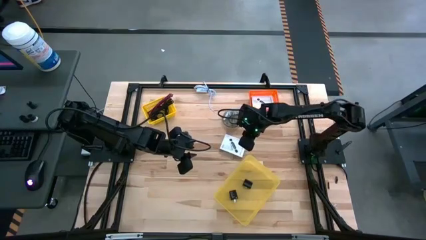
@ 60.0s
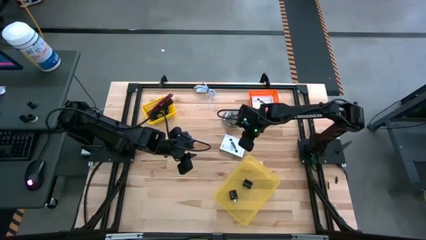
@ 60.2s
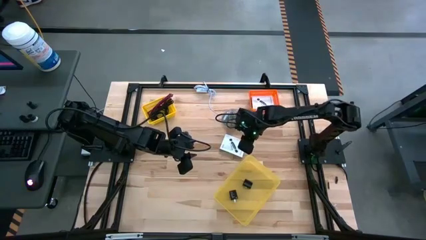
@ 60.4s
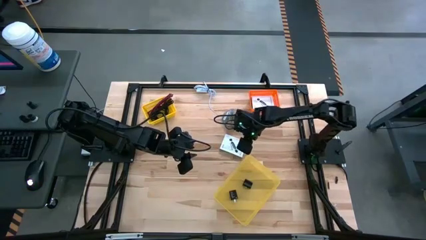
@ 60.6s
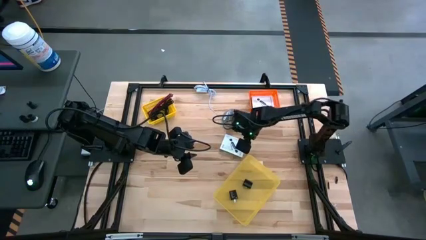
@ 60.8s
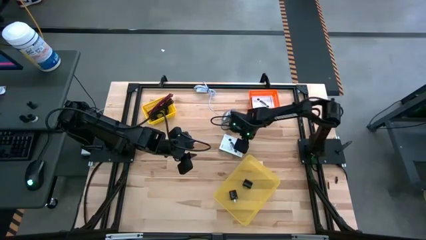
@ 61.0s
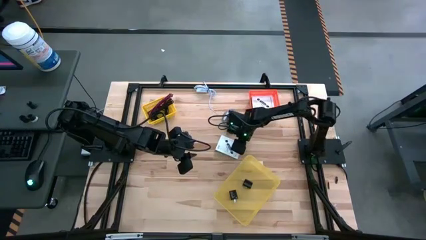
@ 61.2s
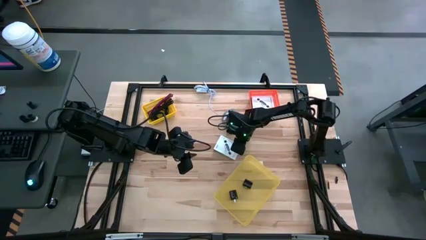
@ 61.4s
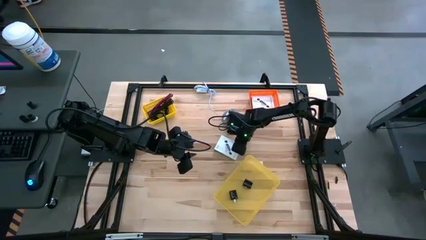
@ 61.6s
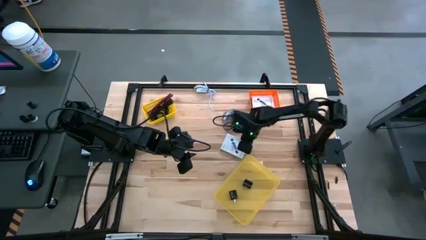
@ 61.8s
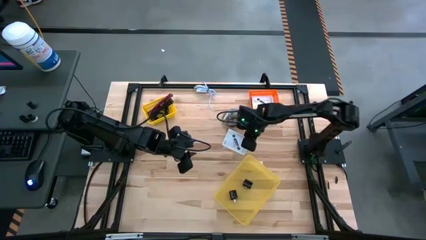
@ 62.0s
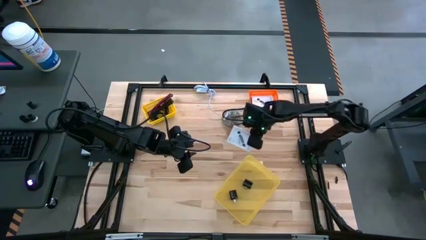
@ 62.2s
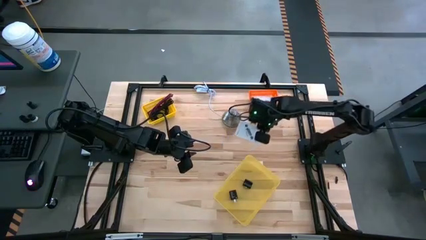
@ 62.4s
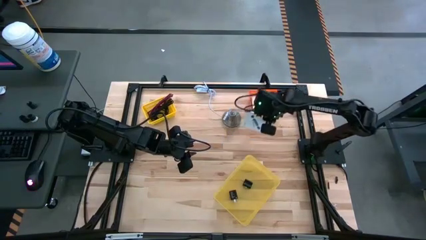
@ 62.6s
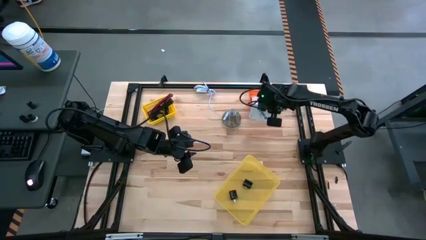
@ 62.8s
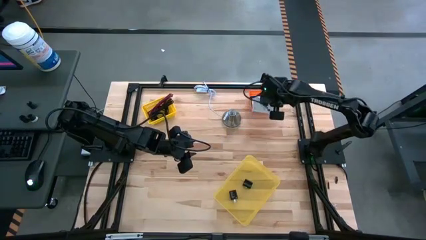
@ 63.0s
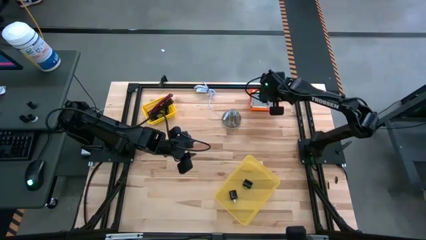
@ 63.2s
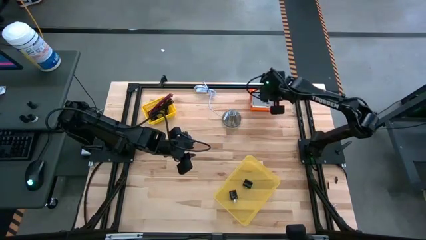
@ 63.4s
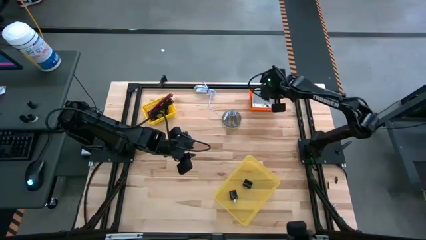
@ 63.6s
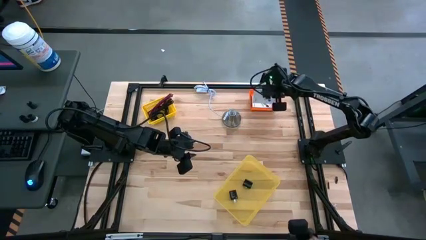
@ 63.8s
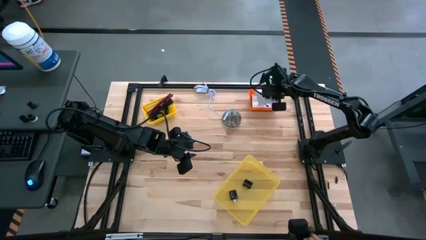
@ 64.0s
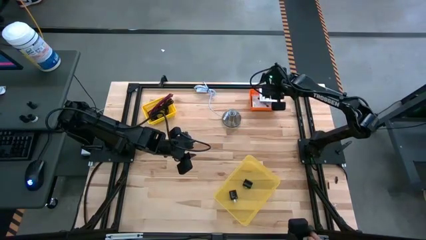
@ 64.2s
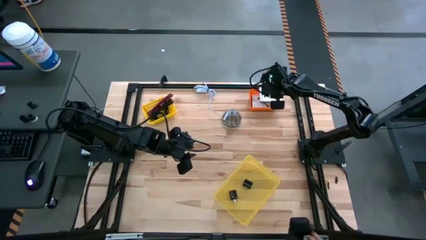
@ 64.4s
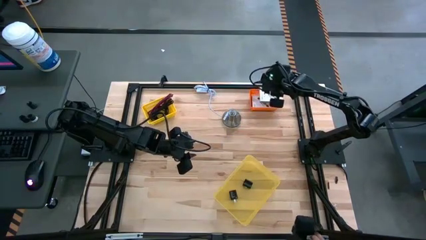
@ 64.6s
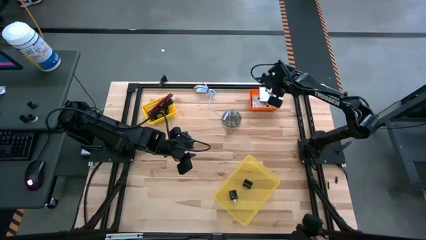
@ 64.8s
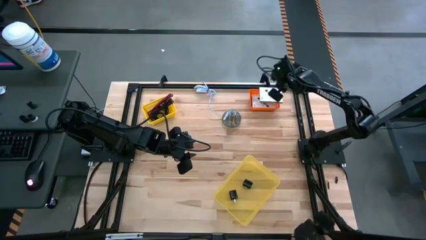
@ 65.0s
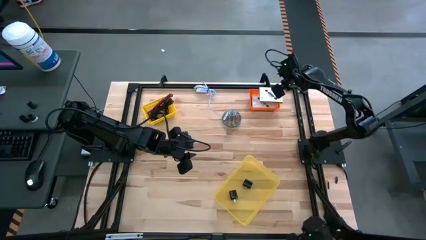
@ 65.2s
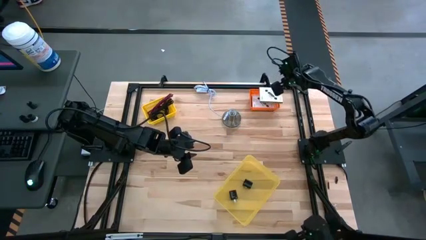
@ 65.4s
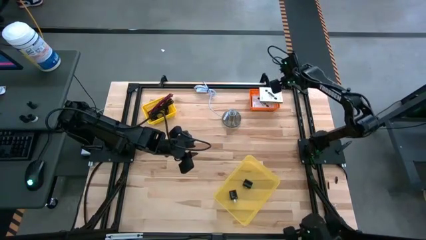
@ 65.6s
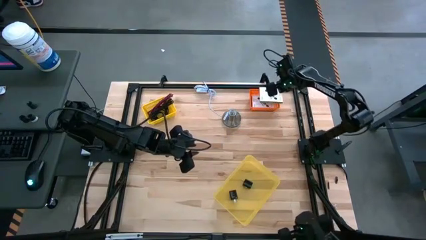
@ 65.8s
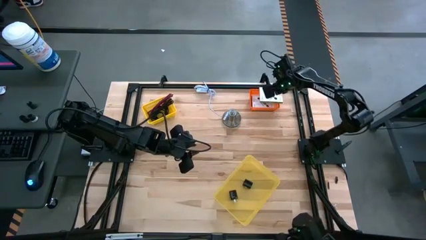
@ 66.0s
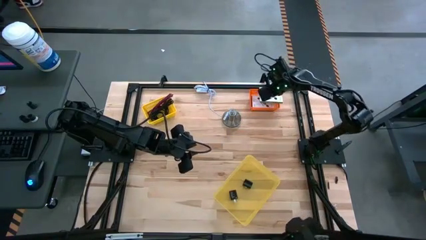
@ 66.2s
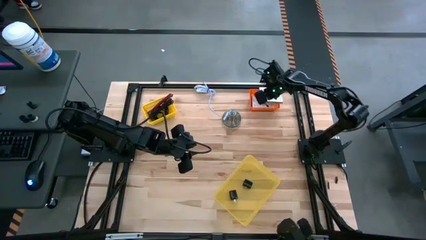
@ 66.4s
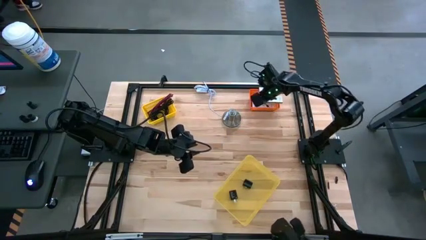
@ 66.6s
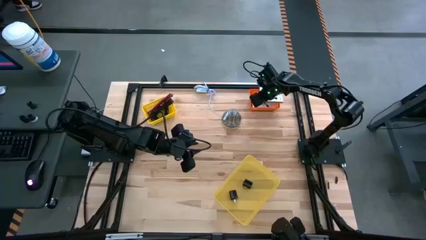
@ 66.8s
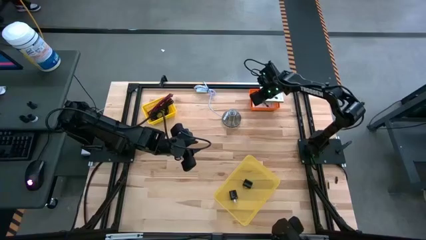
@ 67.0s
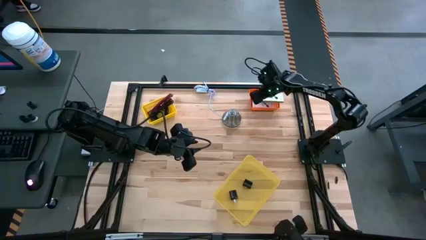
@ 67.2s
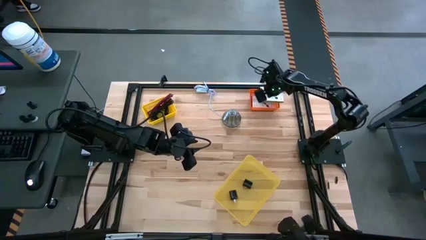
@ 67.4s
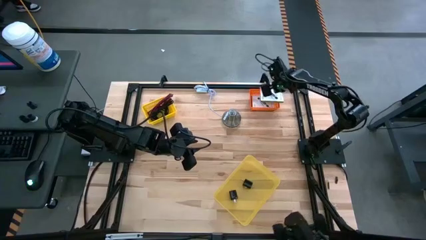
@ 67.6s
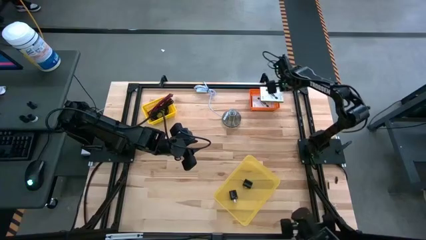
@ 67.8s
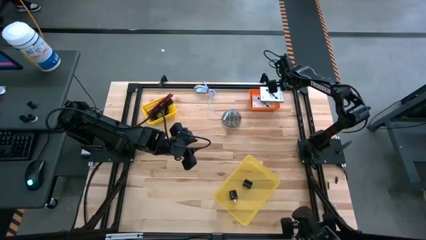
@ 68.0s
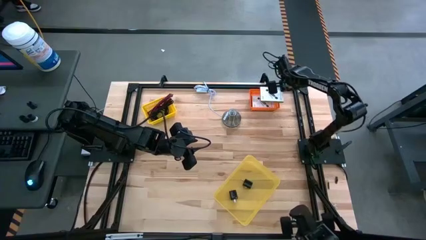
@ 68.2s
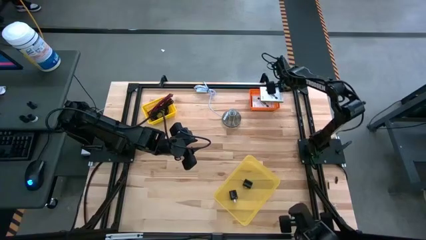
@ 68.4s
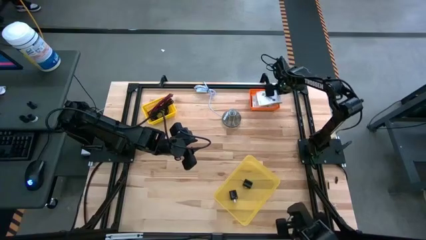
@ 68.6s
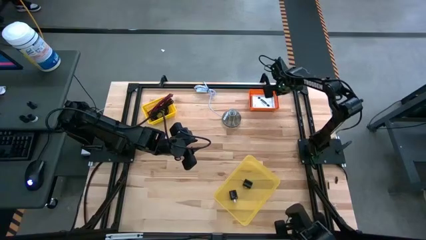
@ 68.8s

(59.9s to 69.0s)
Task: Pick and place items into bin
Put the white card reader box into the orange bin
